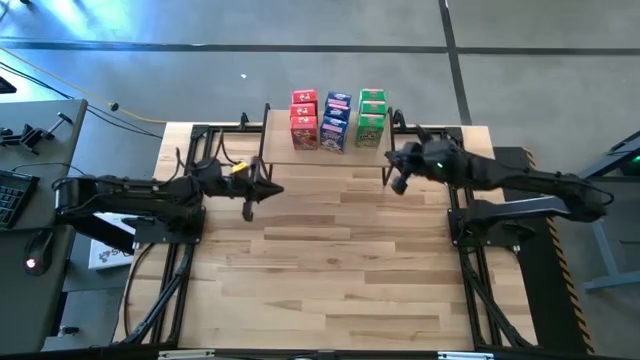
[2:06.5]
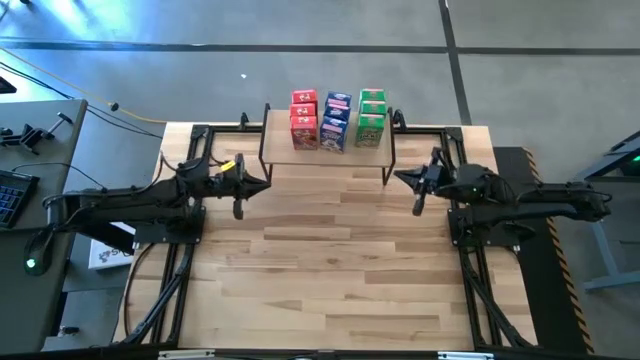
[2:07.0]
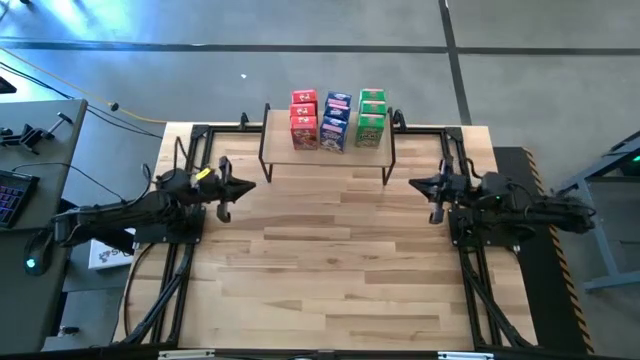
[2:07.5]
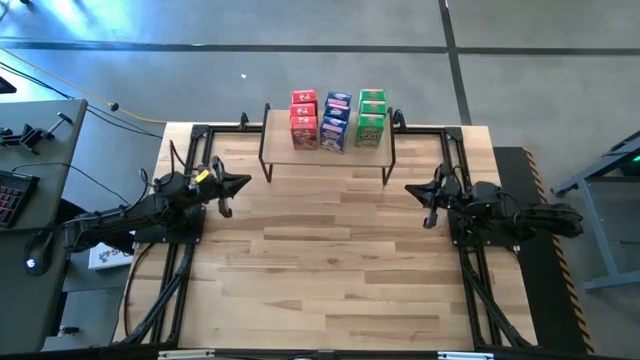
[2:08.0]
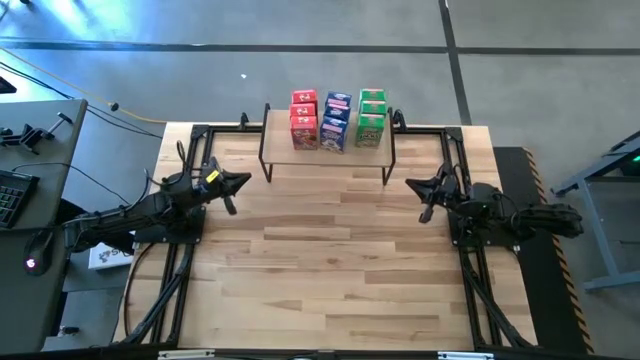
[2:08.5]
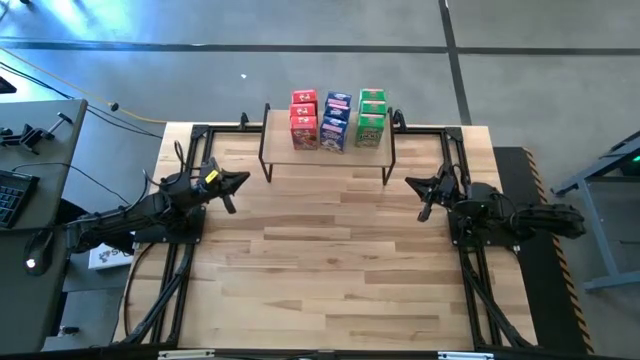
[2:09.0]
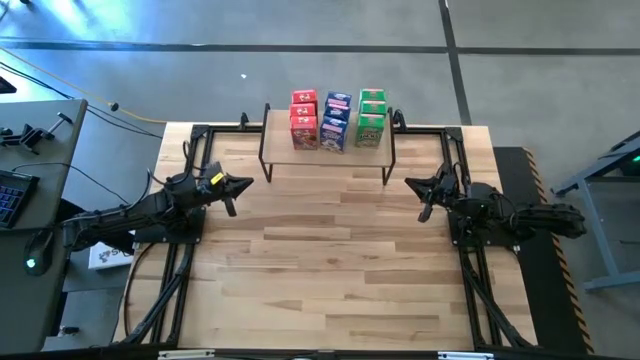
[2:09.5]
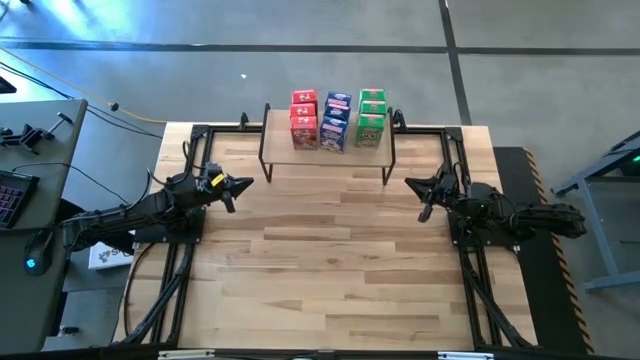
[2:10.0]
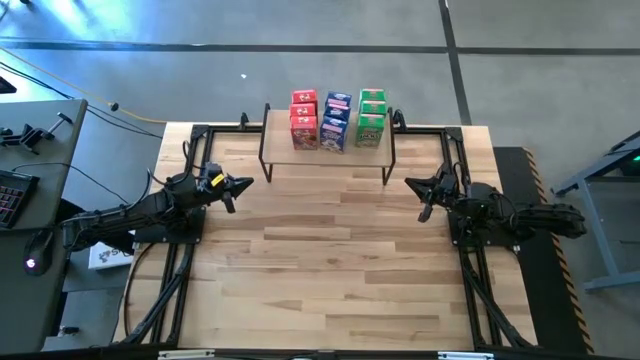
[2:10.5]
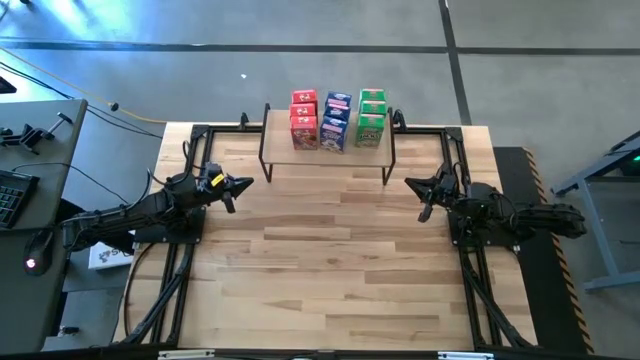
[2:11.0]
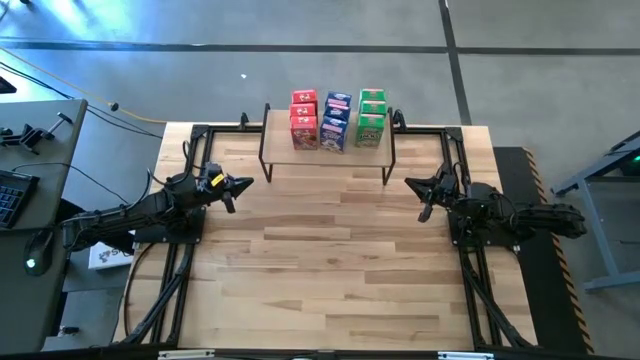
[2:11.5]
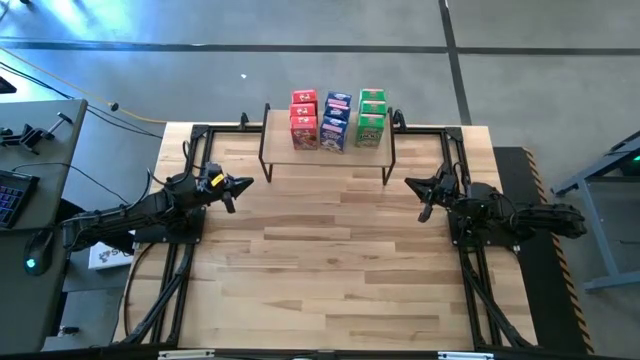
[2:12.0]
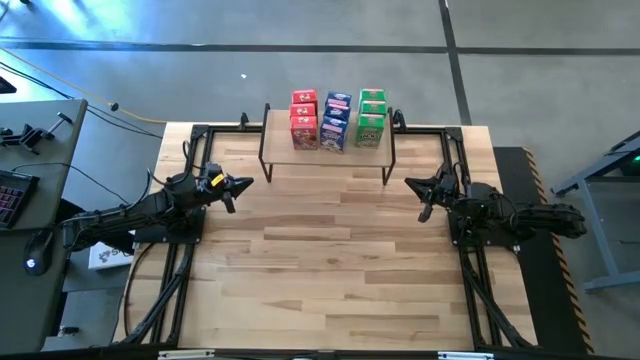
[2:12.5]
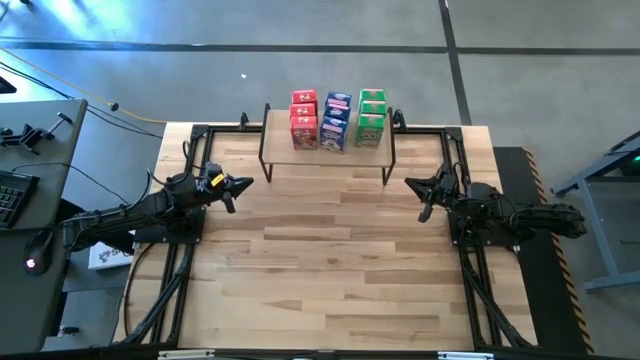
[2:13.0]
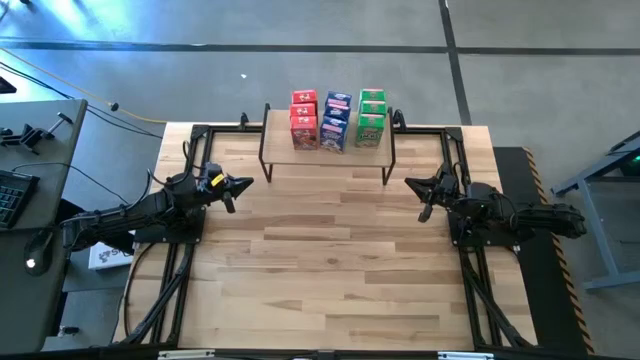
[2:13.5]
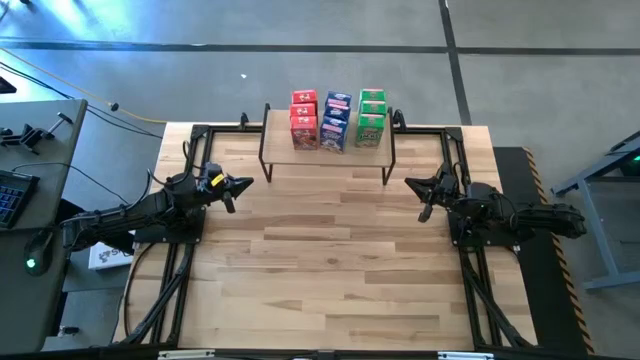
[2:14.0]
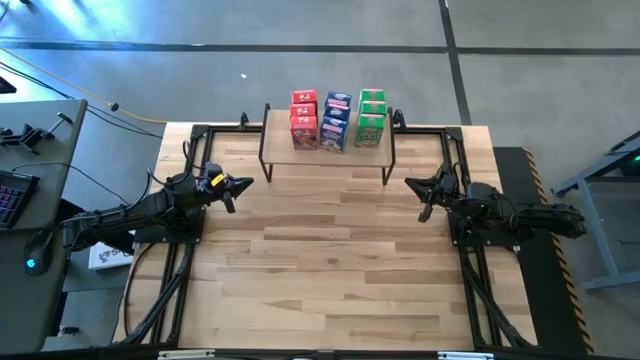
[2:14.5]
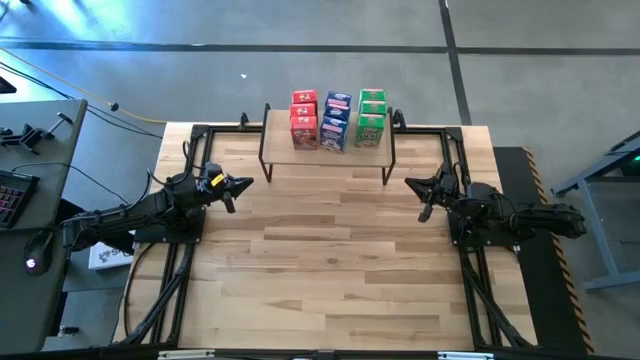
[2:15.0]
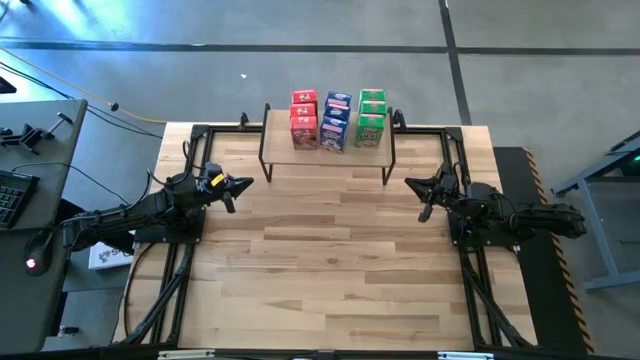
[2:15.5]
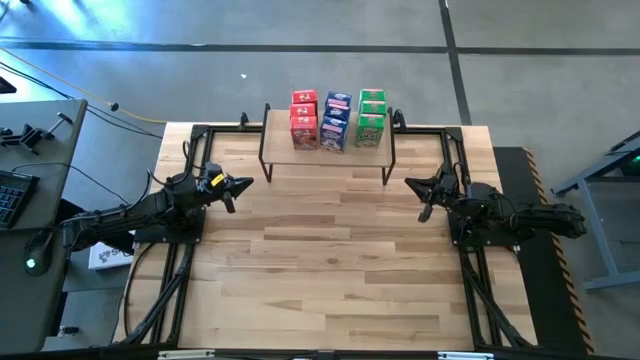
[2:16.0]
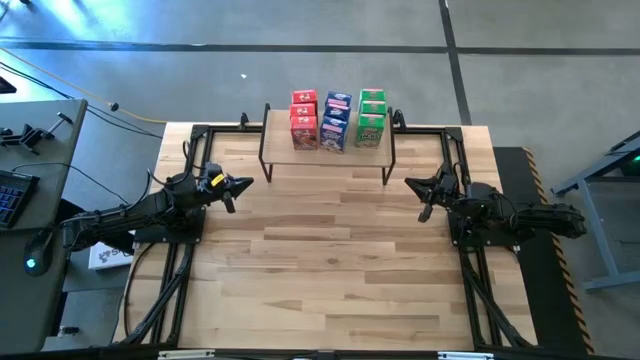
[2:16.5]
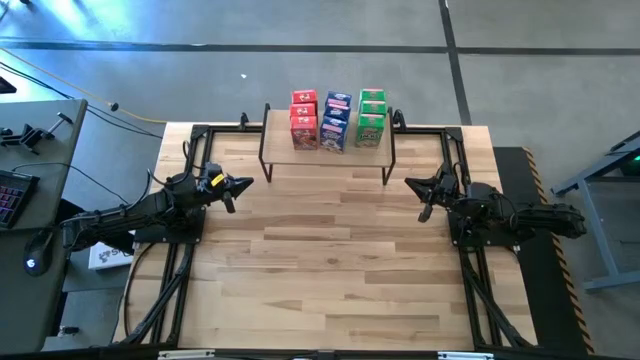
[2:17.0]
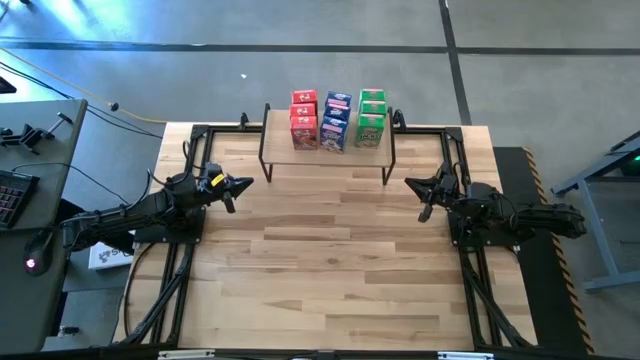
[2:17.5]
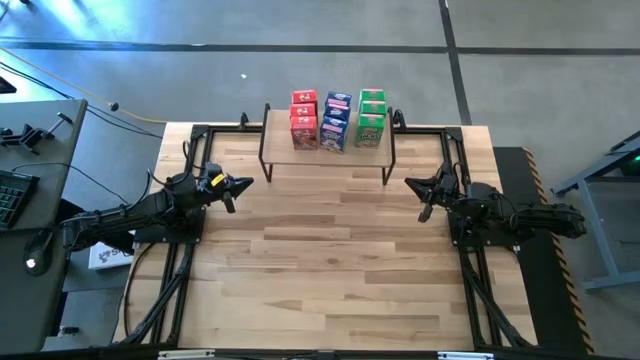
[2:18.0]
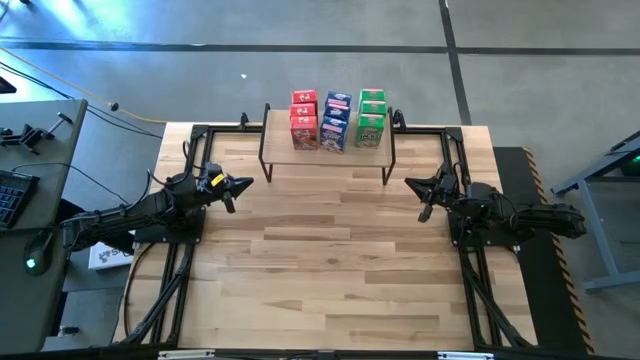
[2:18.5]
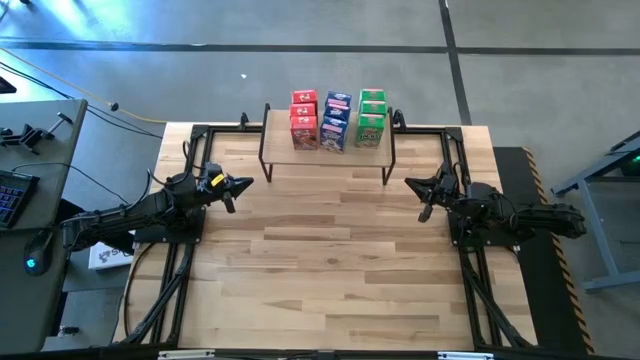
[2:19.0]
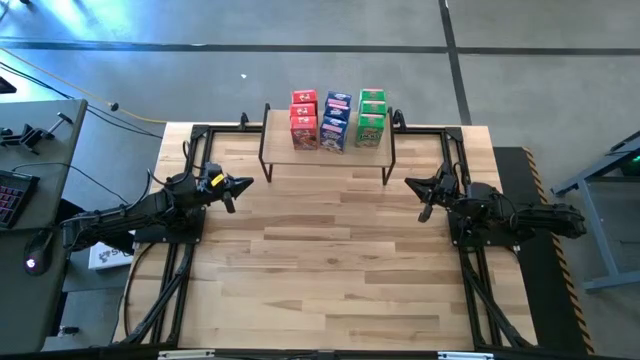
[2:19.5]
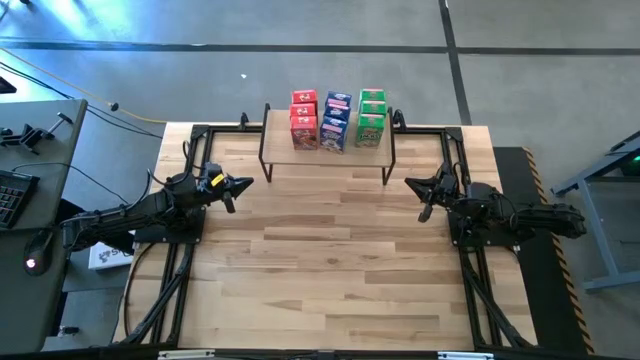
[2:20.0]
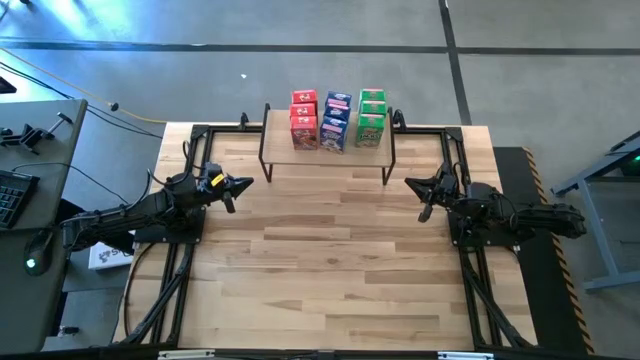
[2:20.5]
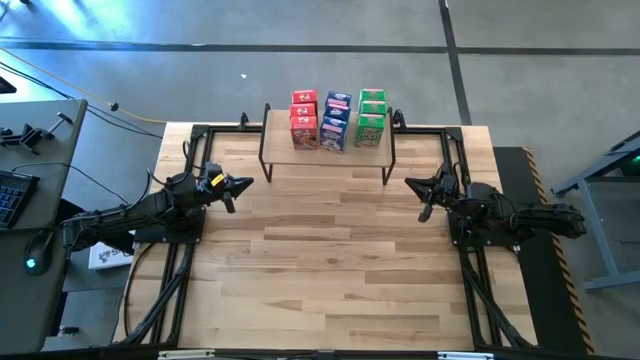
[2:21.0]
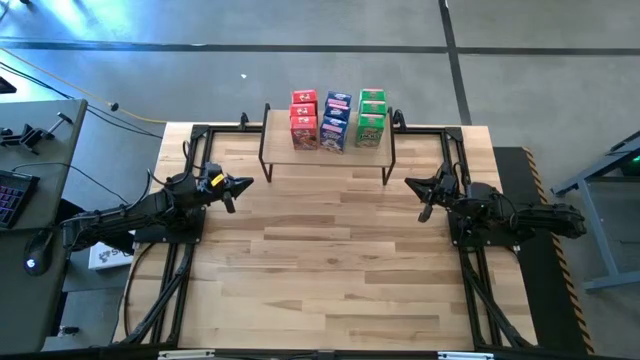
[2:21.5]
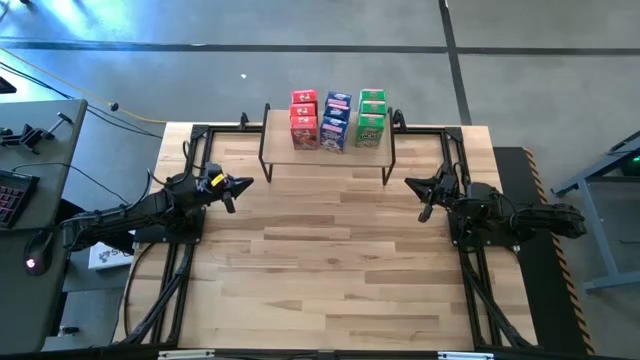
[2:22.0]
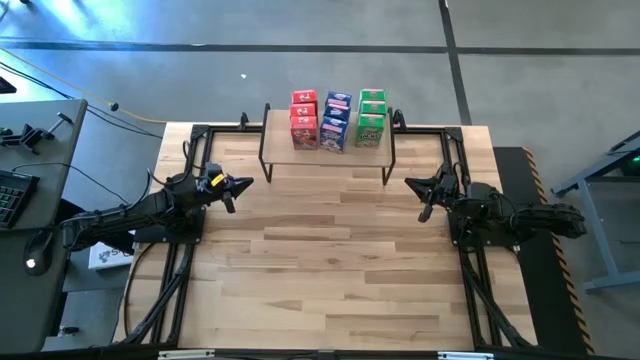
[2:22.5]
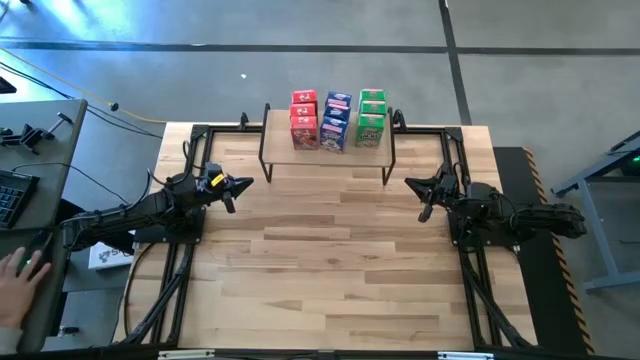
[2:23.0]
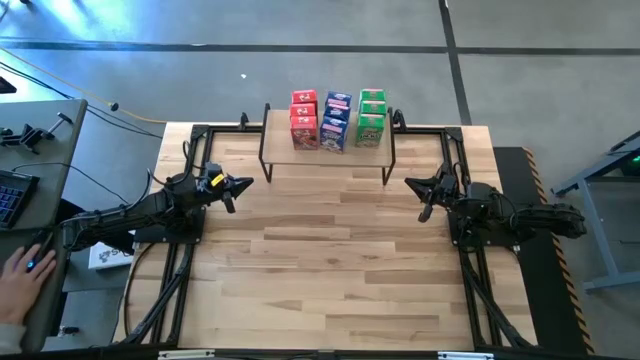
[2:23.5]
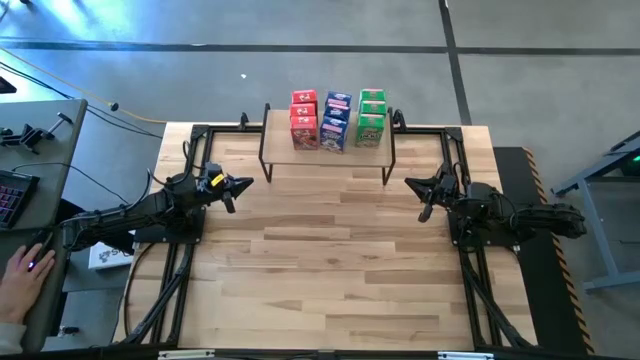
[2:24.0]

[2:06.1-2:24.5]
Task: Stack cereal on shelf
Return to Home Position

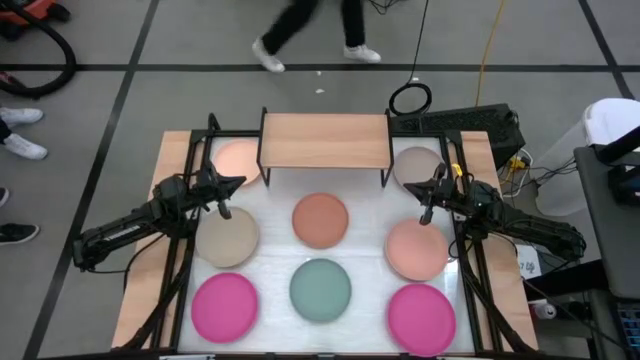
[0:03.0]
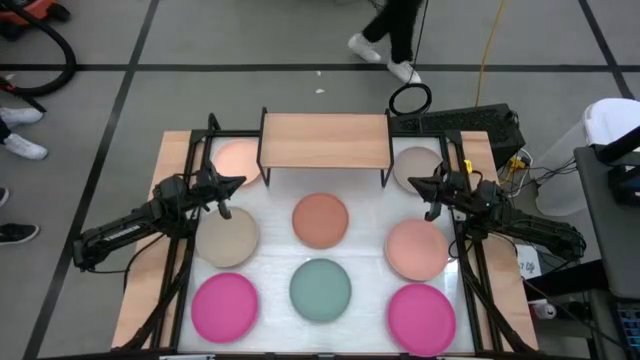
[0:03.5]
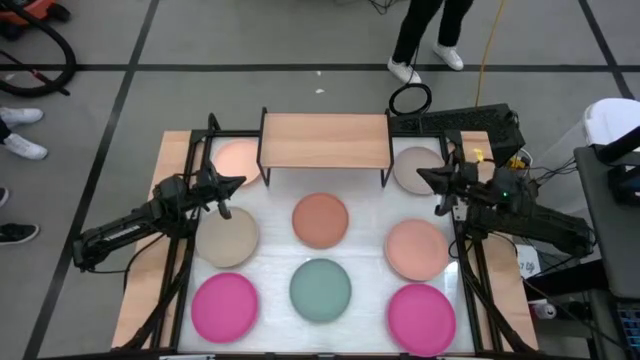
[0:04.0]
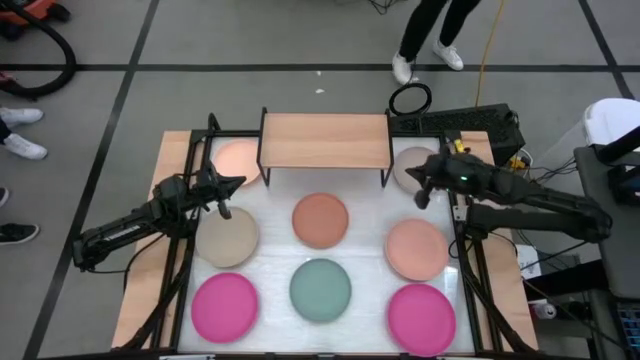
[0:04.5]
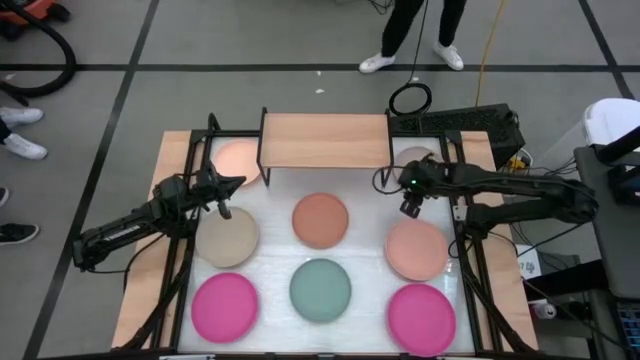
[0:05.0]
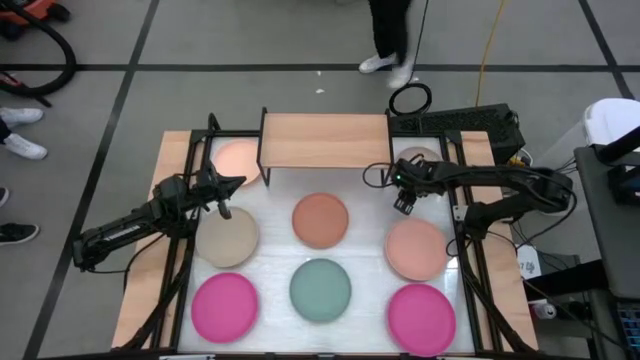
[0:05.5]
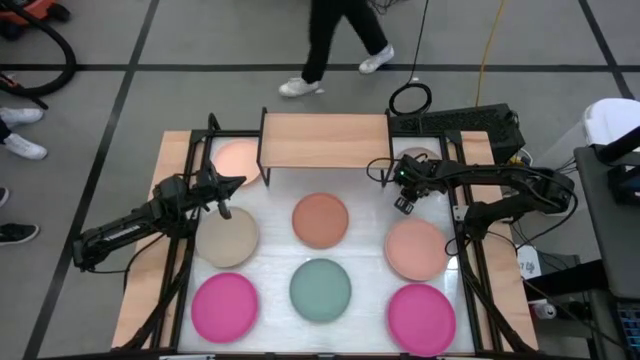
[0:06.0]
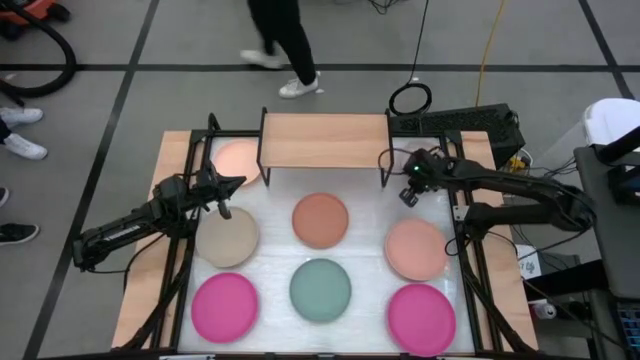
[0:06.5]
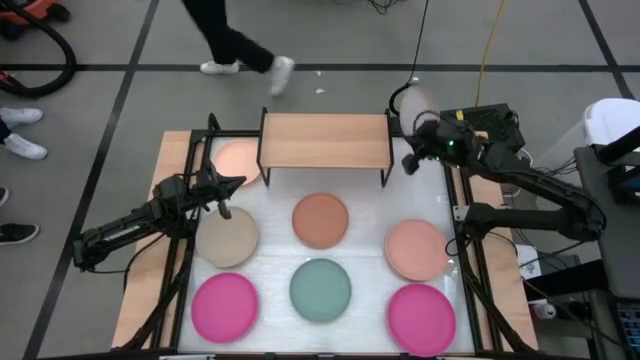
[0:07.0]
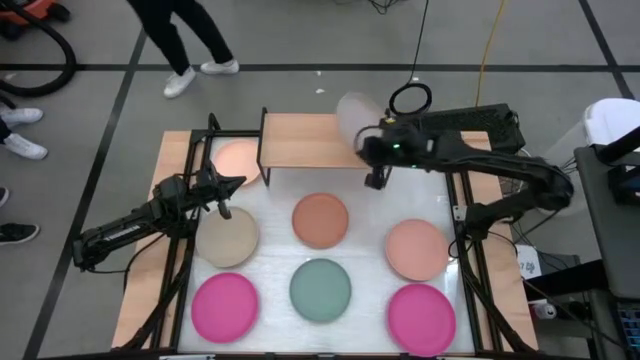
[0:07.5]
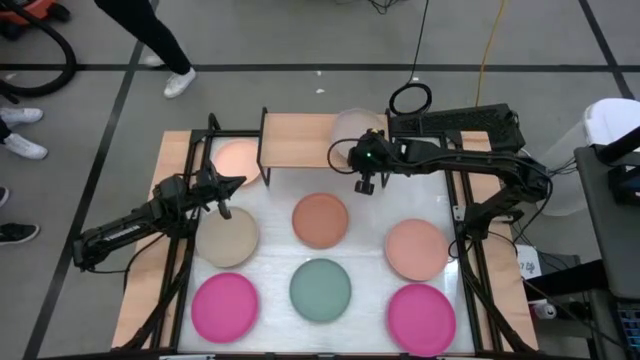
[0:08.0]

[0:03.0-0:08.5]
Task: Place and stack plates onto a shelf
Put the top gray plate on the shelf
